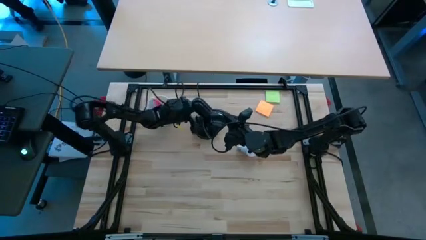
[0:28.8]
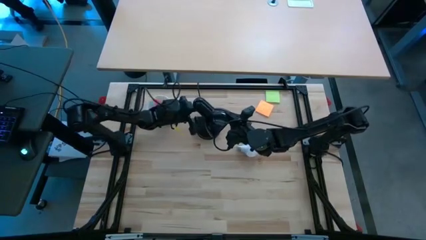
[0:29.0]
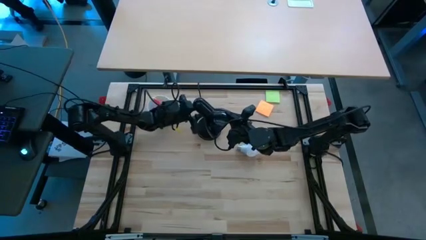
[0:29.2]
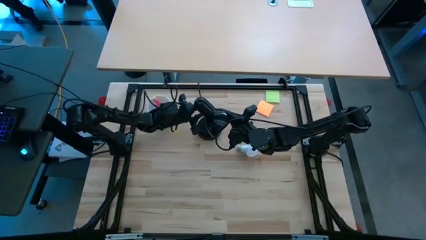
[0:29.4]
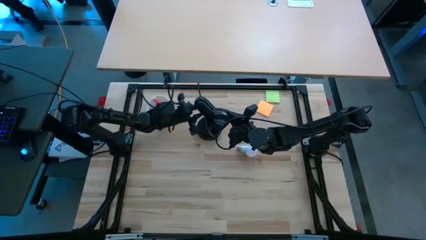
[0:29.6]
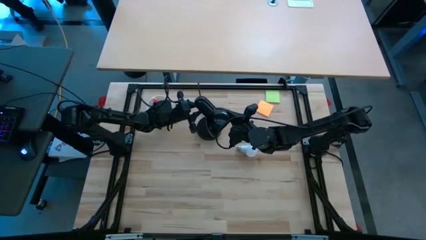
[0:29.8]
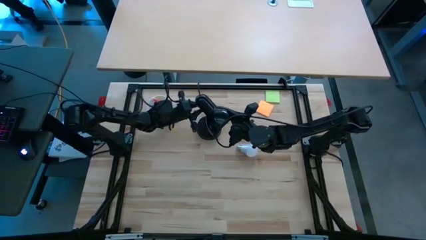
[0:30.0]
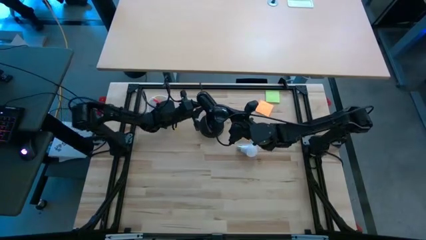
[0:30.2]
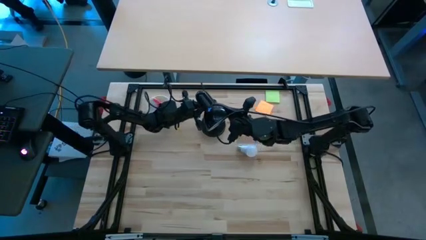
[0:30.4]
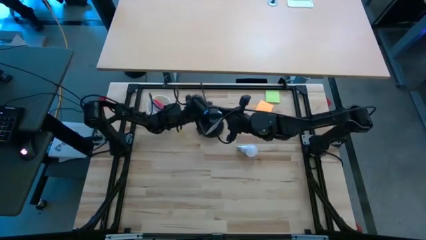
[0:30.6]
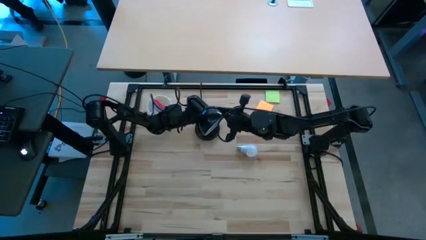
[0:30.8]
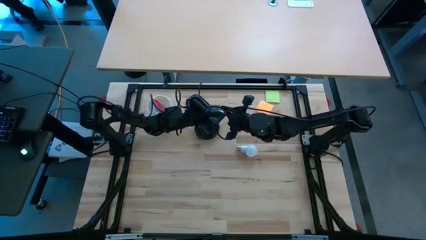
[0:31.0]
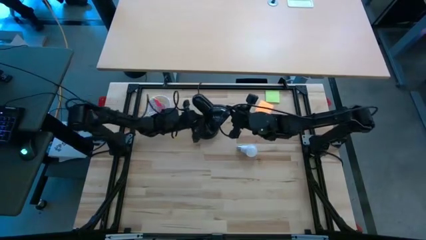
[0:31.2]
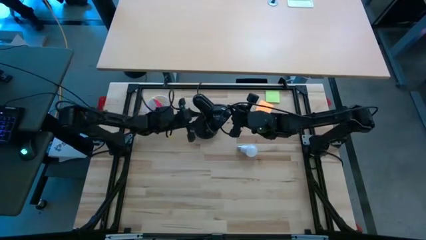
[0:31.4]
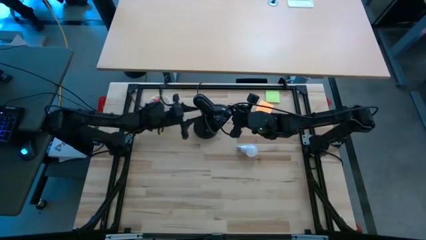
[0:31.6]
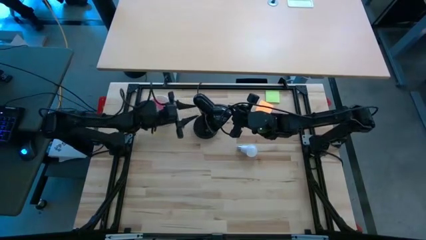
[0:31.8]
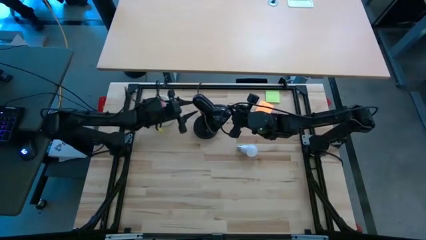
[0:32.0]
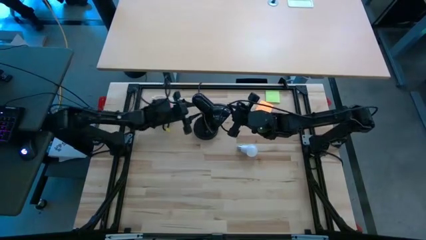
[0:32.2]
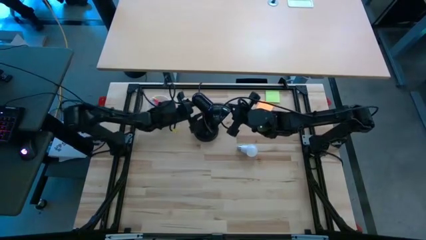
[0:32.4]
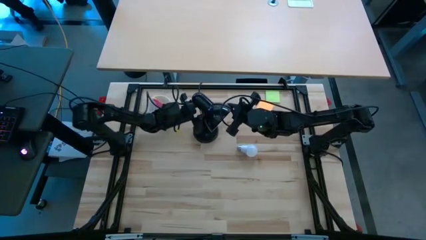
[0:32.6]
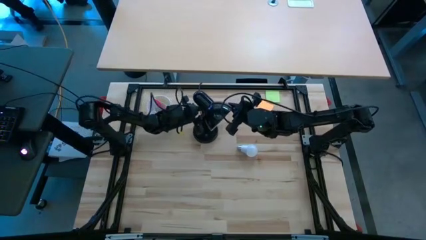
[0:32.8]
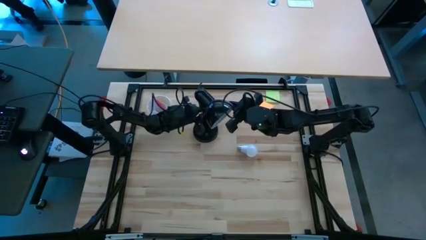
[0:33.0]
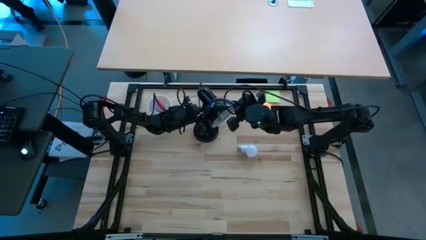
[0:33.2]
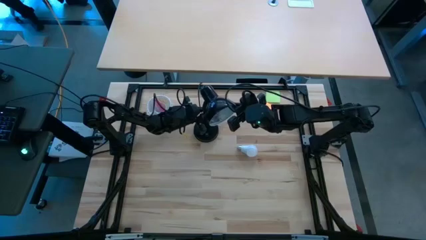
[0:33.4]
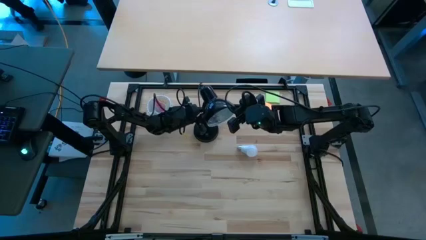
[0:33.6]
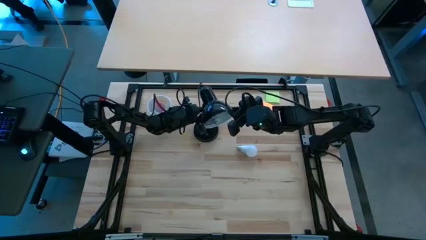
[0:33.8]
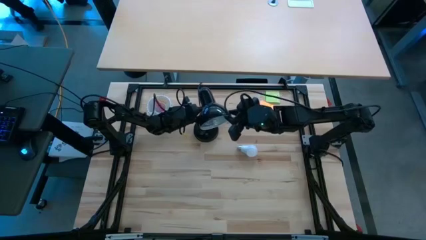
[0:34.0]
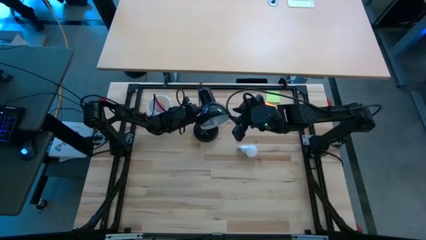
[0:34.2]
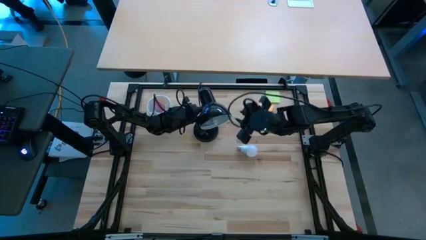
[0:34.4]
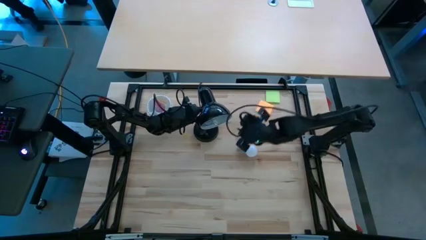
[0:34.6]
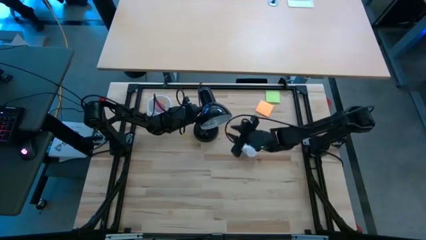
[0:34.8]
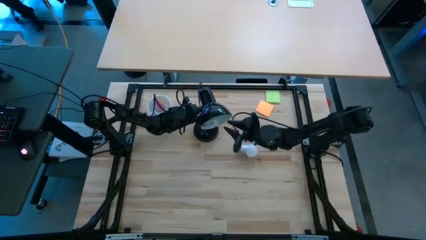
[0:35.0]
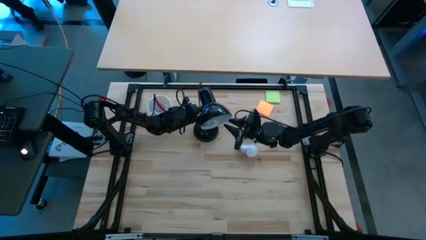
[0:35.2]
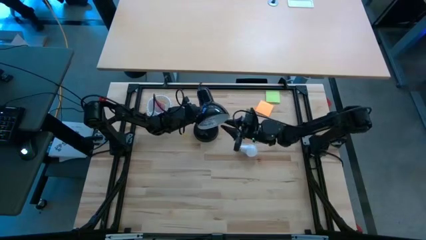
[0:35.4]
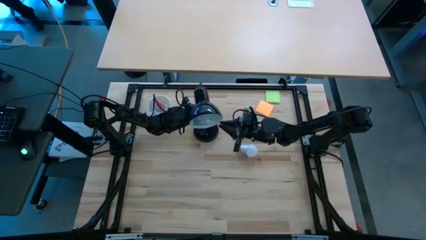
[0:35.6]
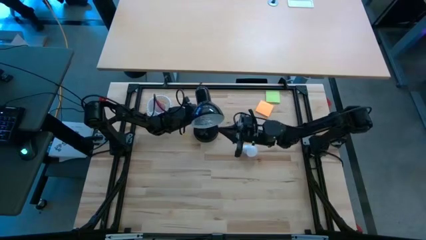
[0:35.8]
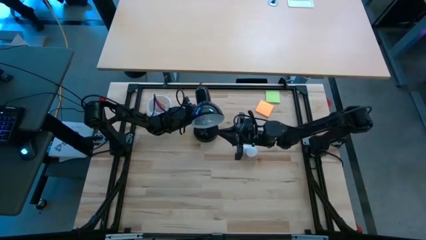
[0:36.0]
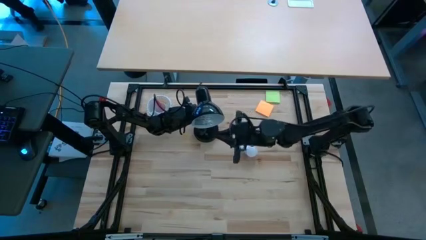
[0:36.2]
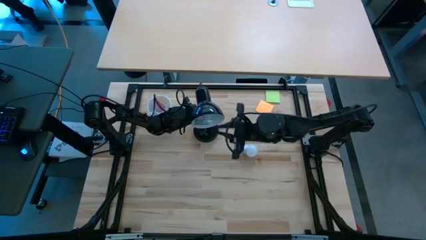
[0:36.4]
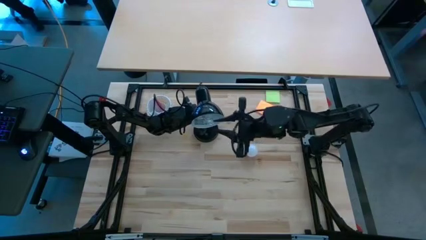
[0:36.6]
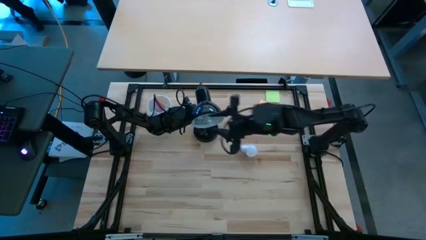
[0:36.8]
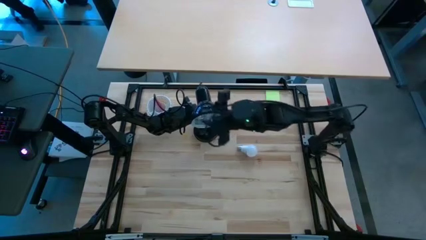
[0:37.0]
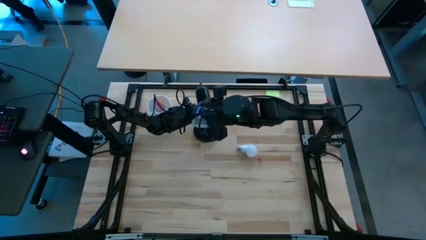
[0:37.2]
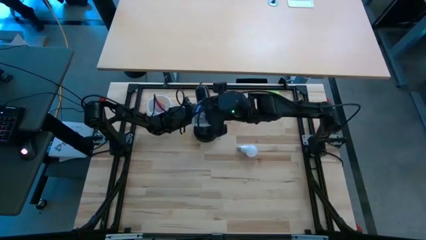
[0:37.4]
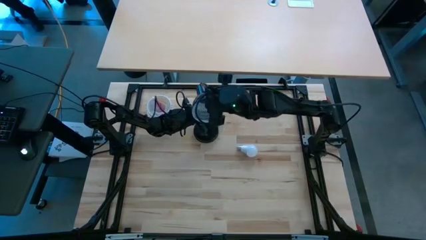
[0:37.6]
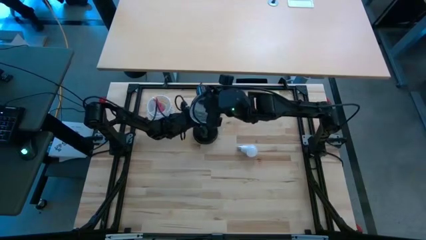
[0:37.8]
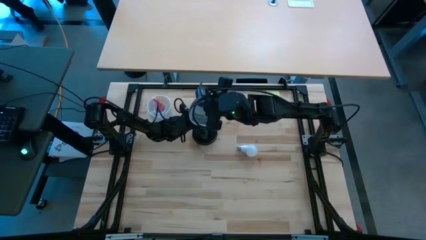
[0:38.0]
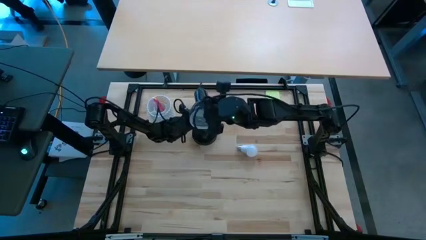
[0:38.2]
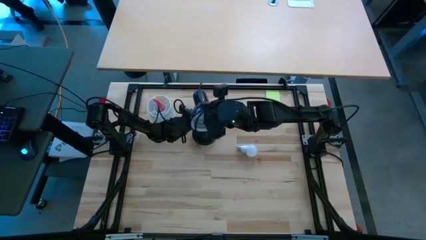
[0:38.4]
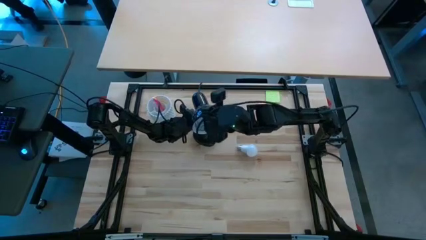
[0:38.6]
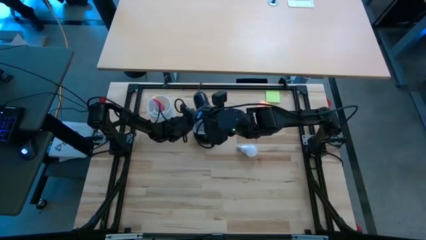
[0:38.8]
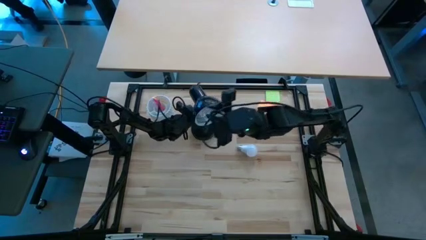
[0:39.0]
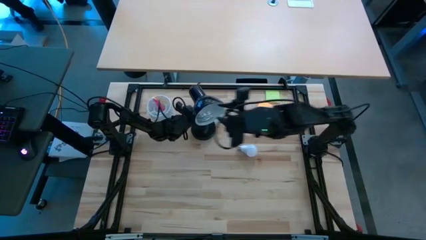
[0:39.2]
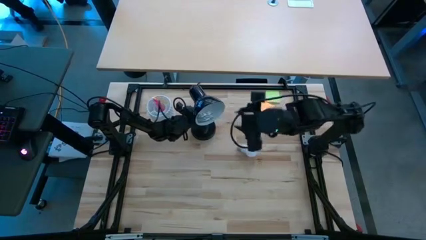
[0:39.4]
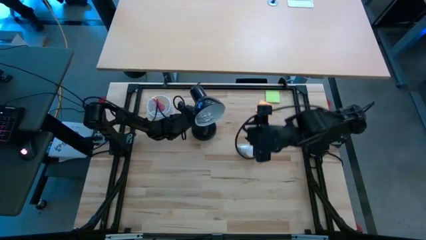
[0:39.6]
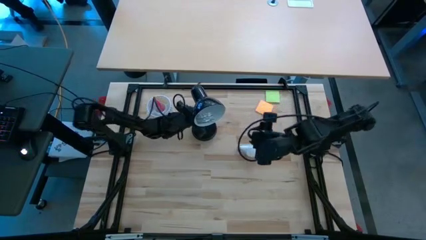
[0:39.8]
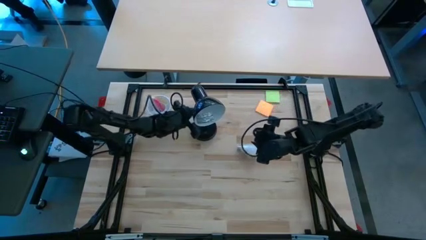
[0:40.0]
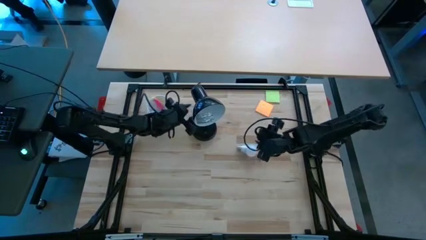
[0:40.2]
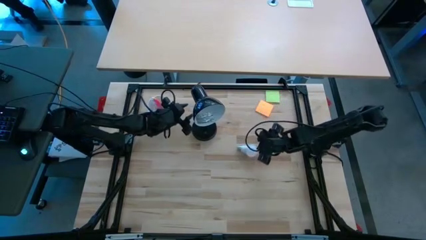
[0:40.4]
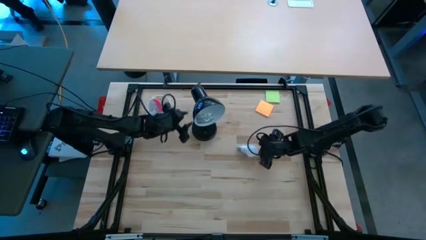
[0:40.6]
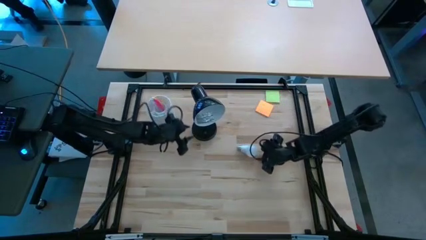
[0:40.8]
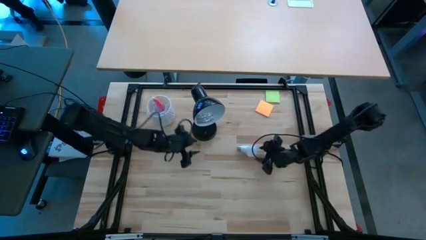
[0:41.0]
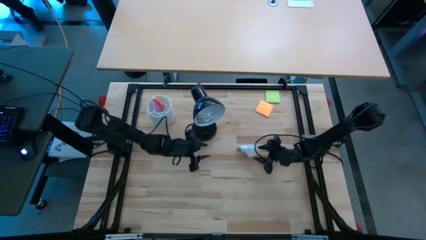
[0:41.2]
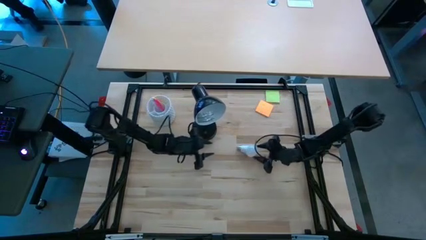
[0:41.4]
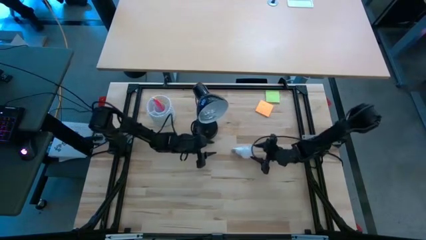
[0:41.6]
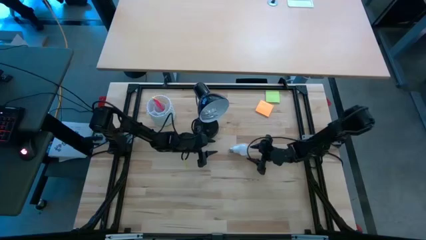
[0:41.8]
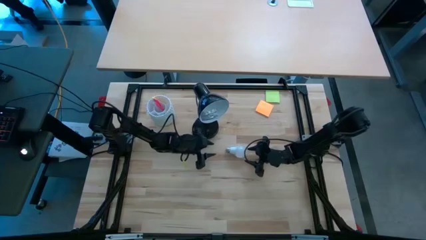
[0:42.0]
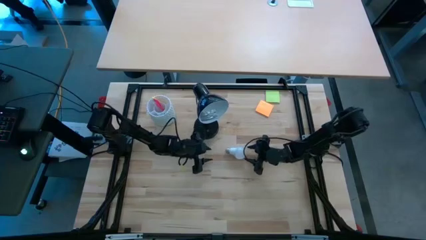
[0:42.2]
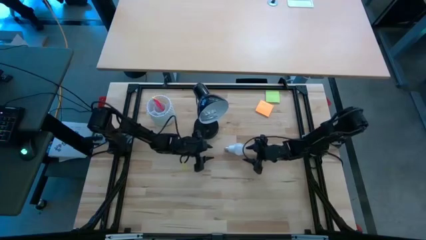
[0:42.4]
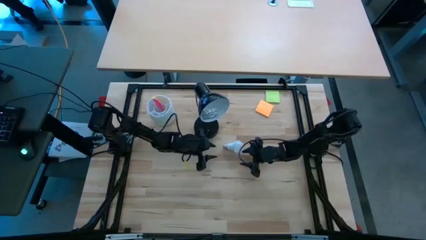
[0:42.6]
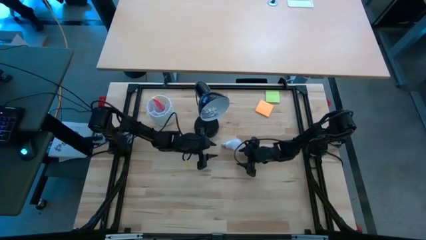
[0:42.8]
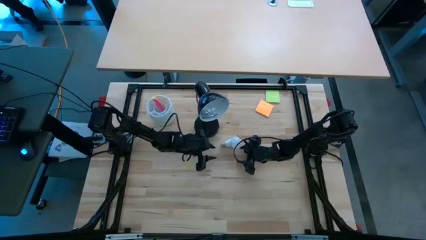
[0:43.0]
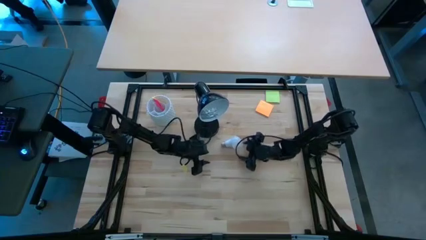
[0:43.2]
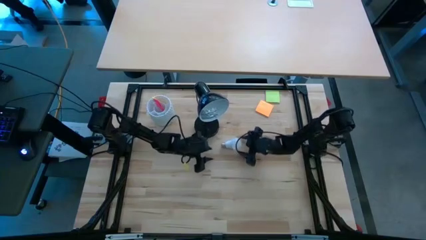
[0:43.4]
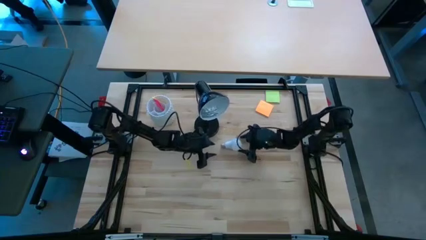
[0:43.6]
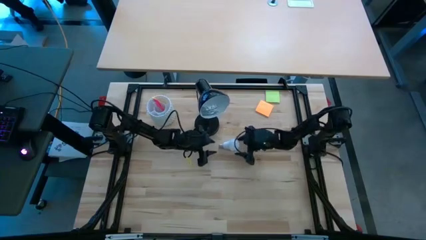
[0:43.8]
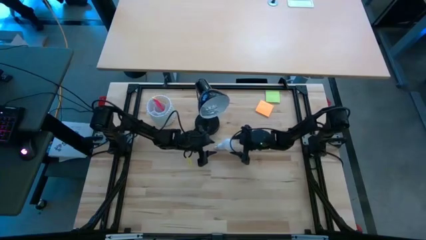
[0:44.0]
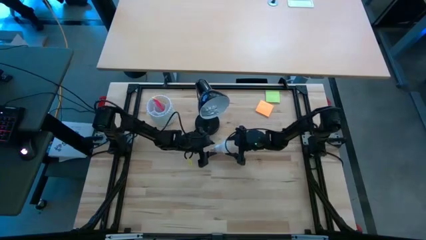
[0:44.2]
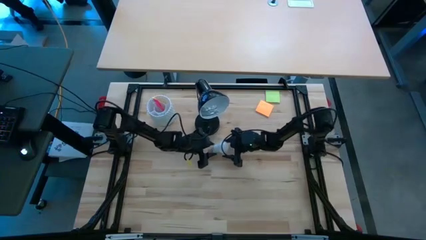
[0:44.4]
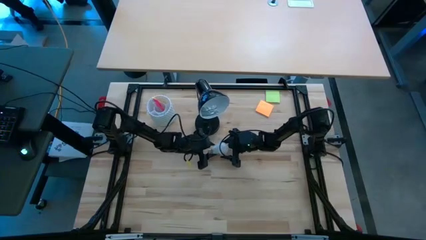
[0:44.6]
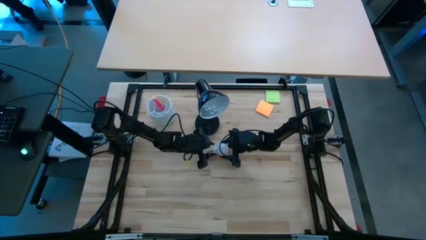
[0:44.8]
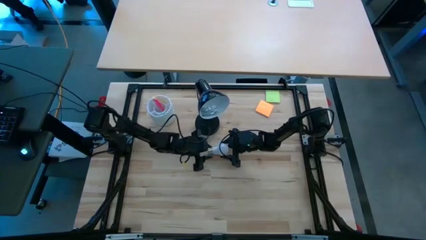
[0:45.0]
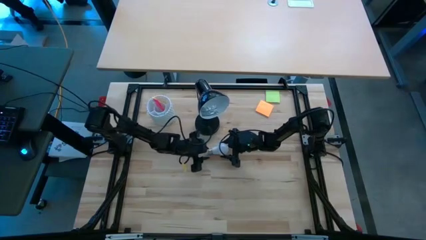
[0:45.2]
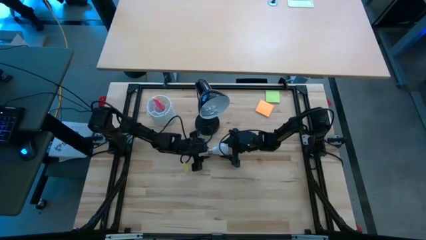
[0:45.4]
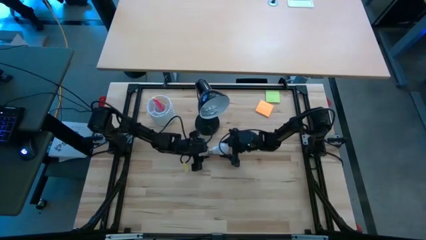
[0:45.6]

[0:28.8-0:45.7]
Task: Screw lightbulb
Insert the light bulb into the desk lamp
